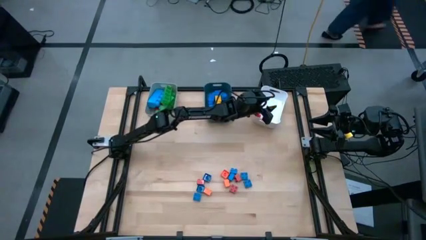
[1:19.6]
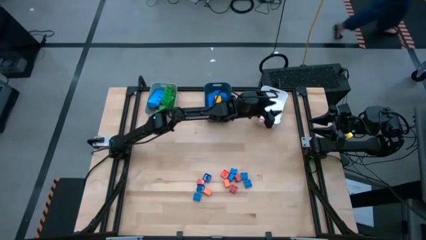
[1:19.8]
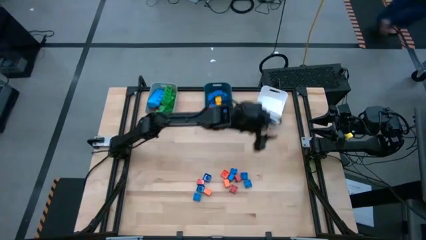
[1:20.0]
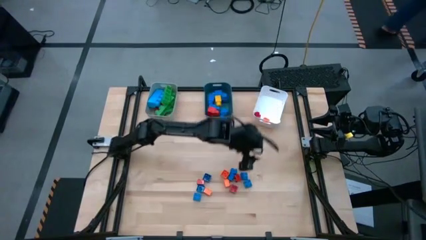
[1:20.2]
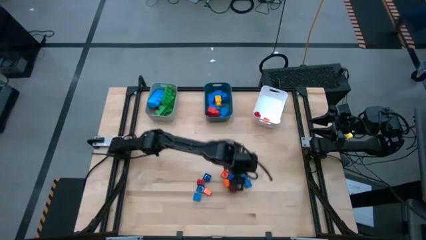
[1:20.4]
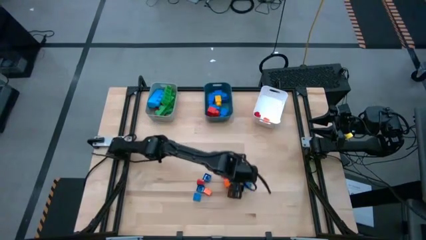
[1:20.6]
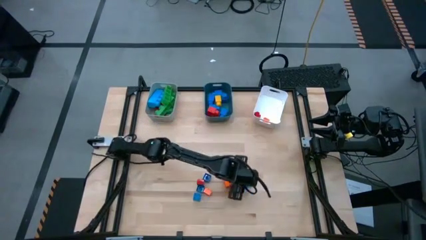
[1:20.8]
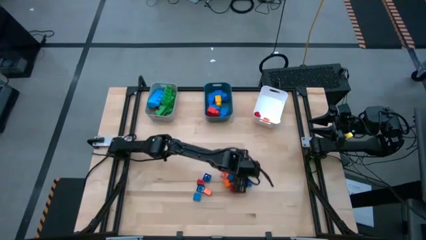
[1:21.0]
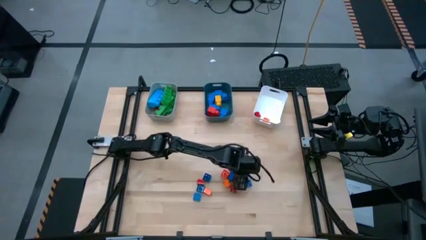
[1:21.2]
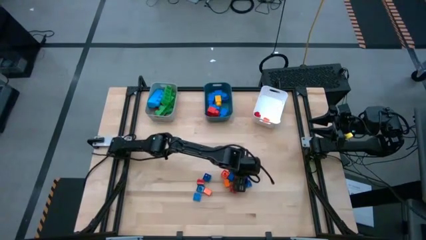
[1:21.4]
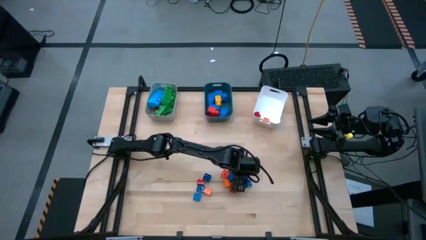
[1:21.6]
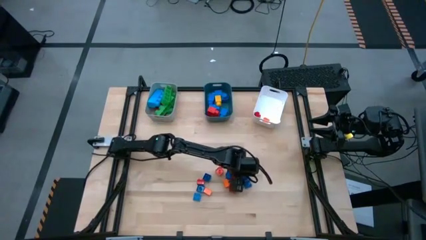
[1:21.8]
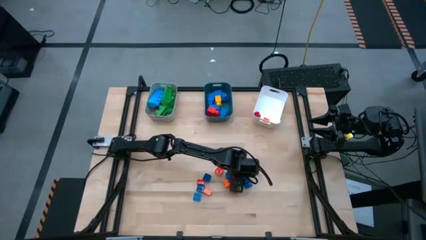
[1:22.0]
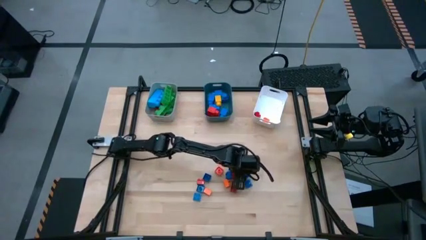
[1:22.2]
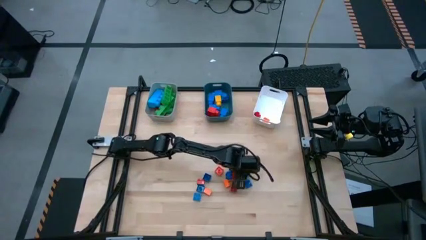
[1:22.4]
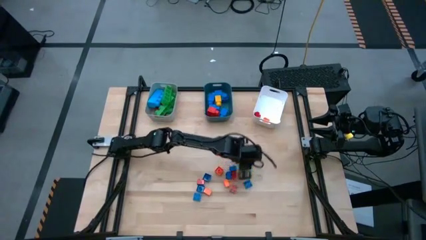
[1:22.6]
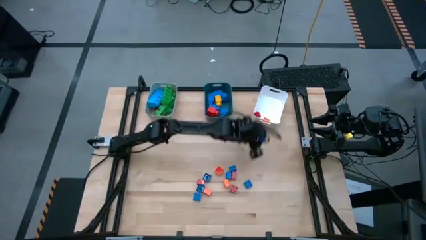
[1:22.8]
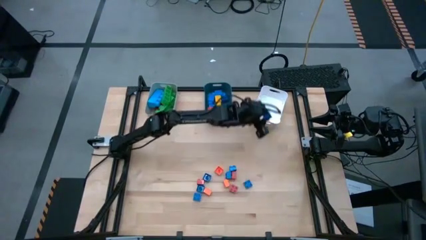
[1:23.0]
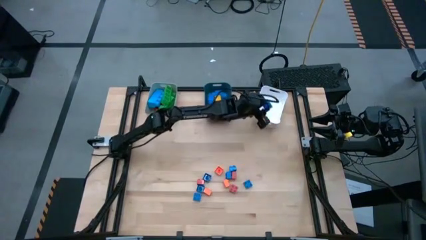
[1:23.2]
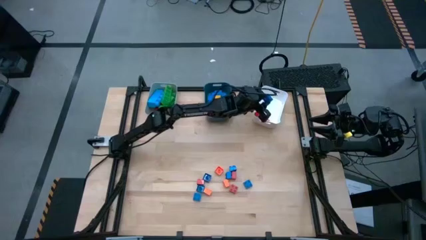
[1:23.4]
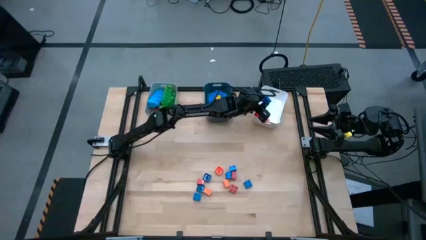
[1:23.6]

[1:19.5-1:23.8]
Task: Sort blocks by size
Put the small blue 4 stud game piece into the white bin

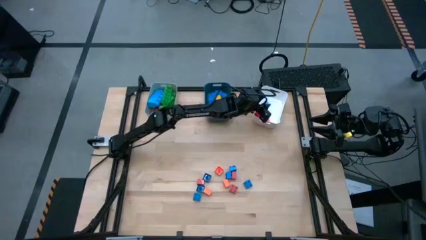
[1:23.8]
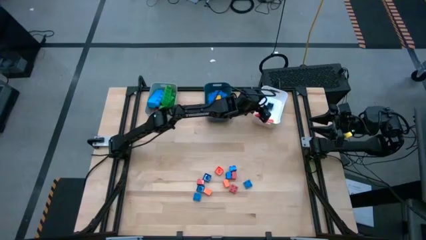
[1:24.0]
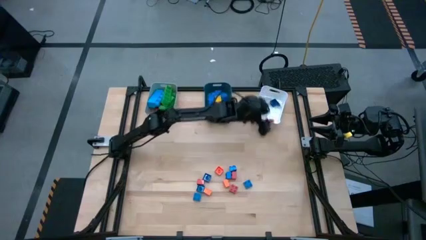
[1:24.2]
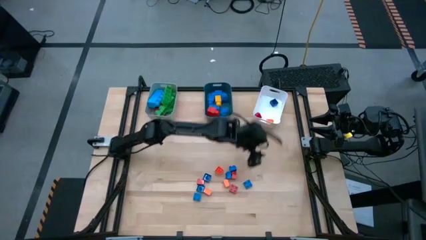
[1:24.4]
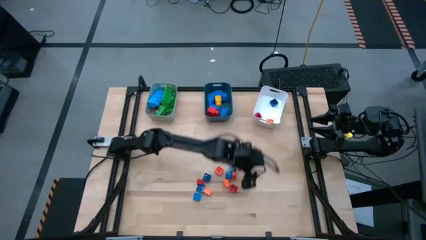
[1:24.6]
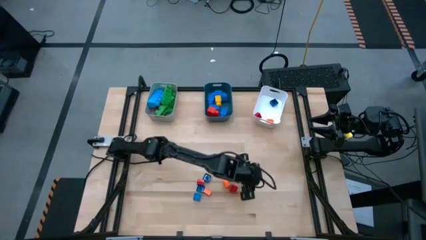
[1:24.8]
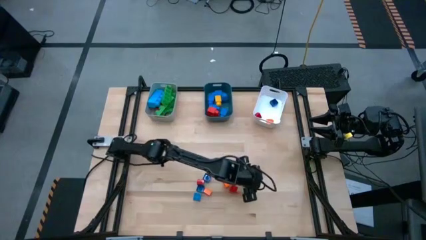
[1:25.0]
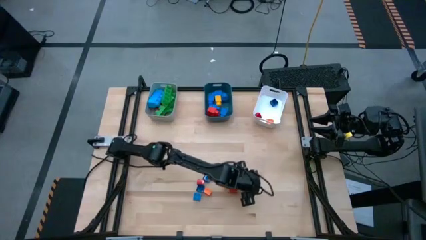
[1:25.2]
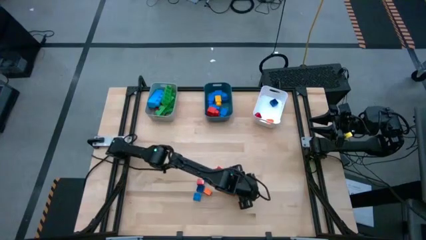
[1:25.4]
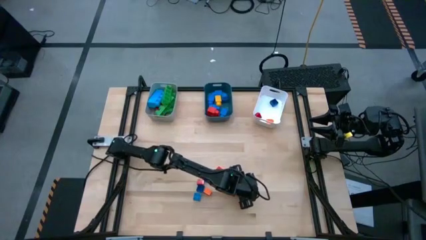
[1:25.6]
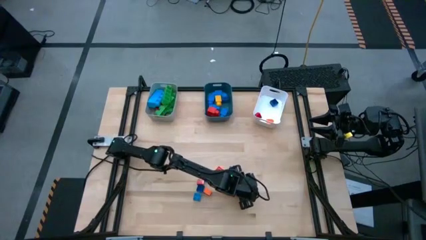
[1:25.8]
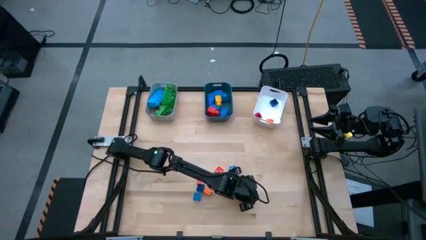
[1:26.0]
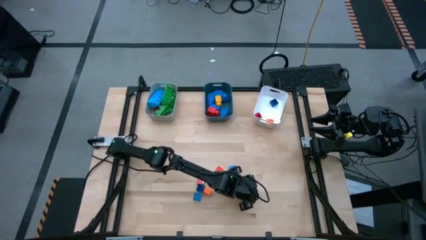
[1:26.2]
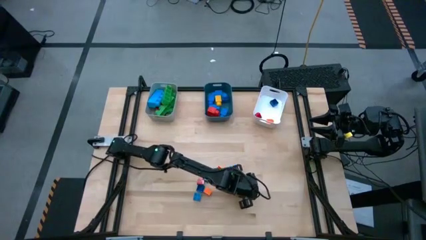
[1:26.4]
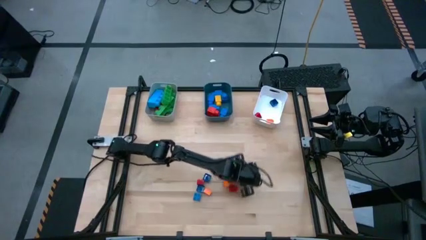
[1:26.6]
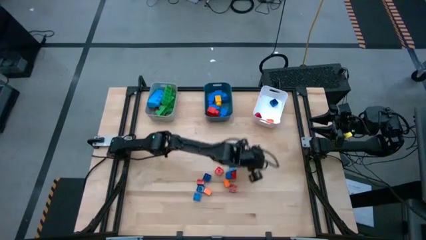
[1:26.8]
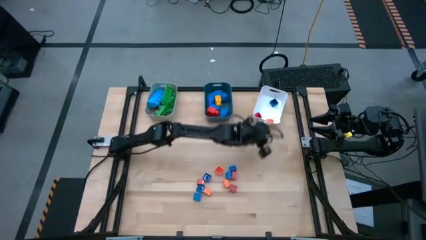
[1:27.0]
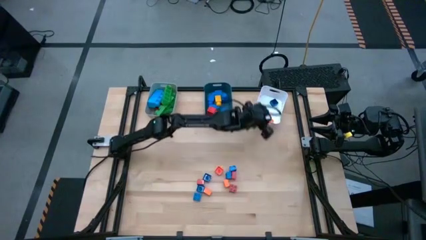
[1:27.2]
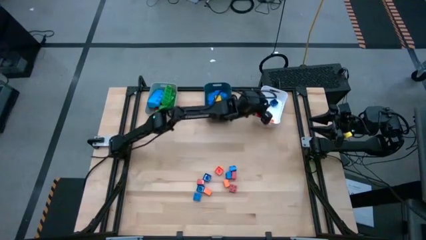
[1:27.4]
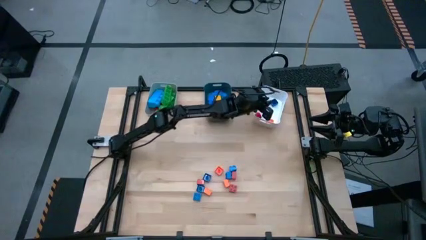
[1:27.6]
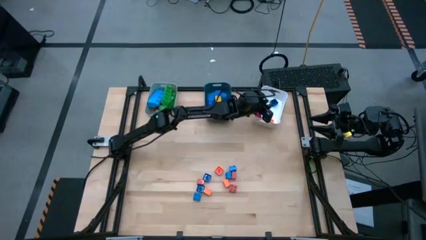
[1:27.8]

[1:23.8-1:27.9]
Put the small blue 4 stud game piece into the white bin

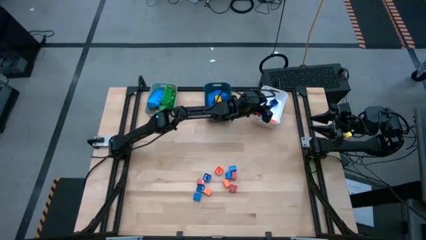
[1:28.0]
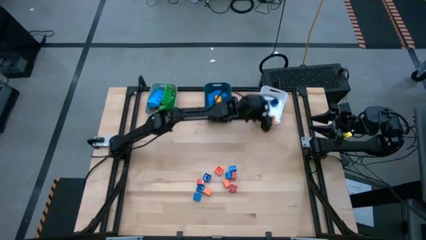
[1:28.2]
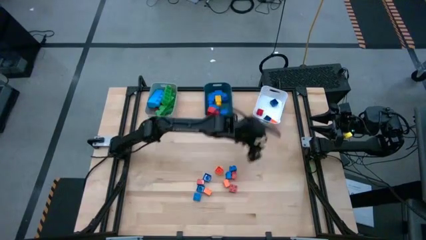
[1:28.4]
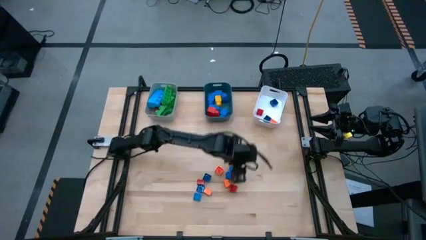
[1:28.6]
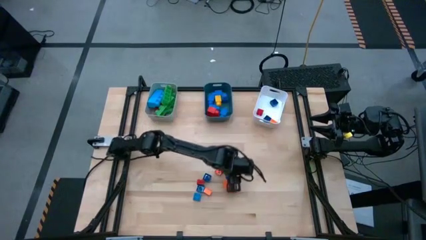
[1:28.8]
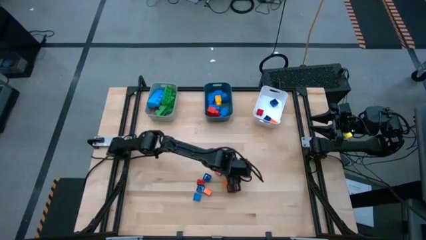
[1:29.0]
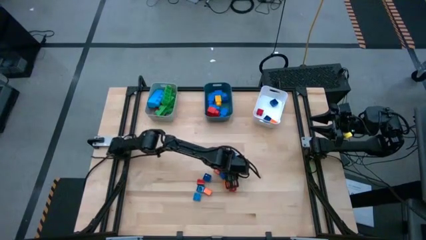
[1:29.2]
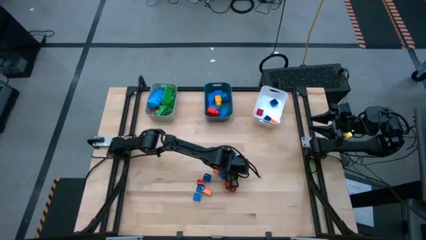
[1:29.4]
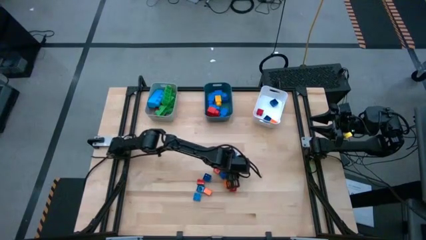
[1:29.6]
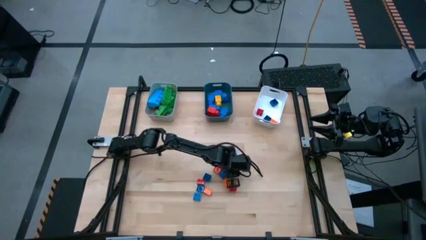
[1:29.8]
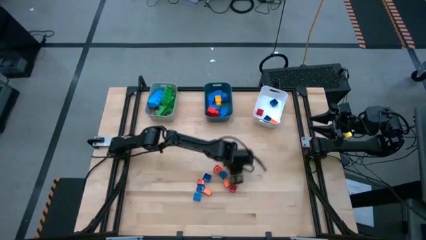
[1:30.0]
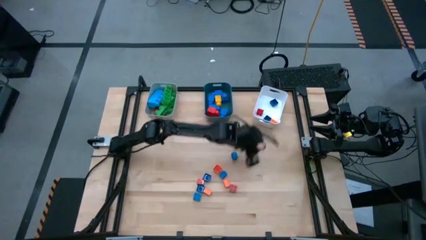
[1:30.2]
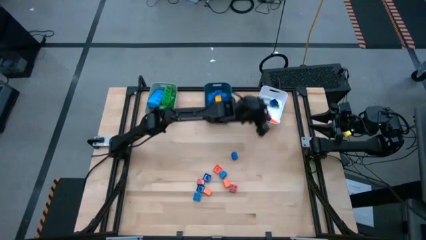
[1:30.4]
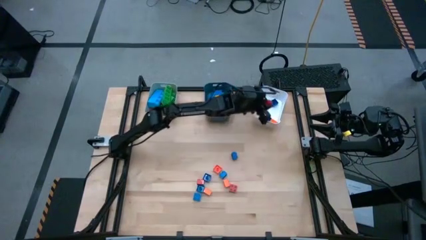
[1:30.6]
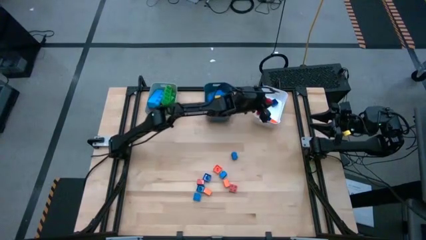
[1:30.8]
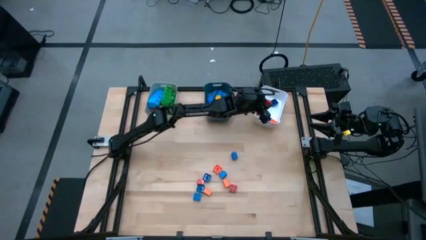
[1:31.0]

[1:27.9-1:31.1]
Put the small red 4 stud game piece into the white bin

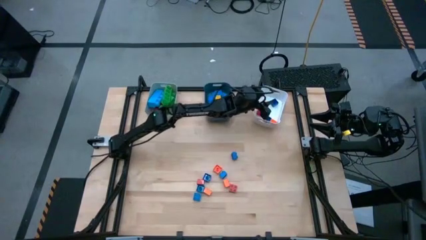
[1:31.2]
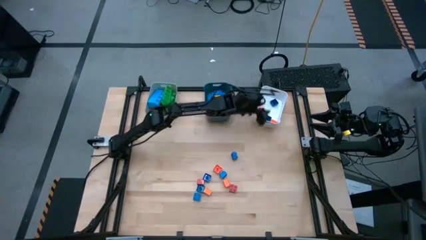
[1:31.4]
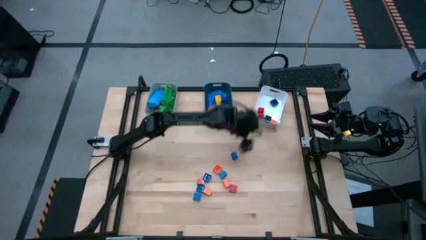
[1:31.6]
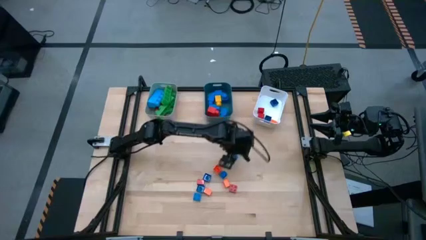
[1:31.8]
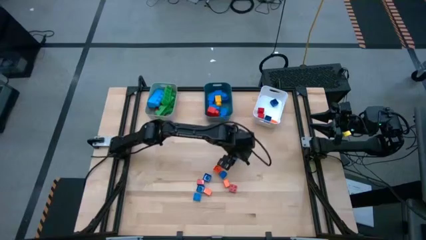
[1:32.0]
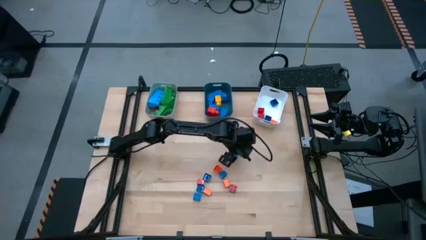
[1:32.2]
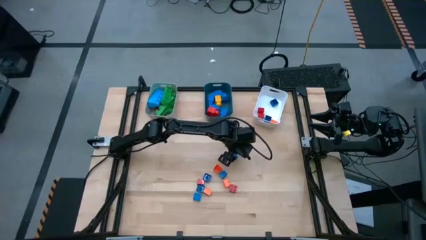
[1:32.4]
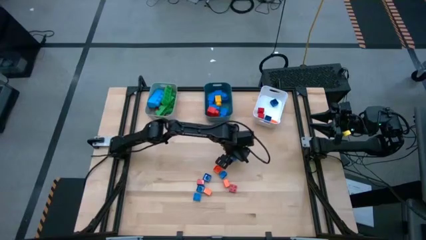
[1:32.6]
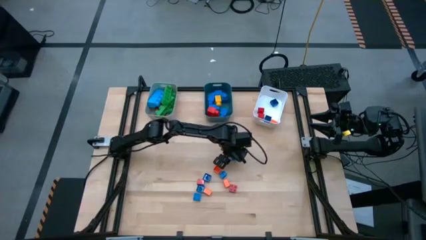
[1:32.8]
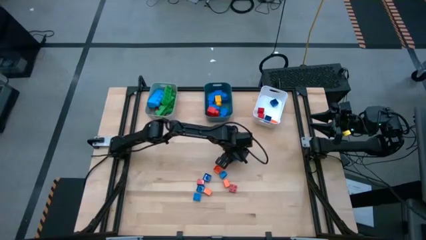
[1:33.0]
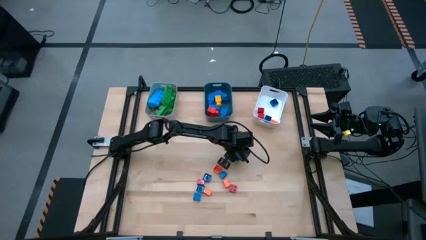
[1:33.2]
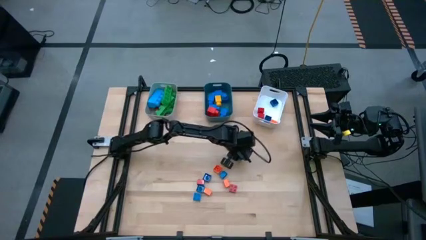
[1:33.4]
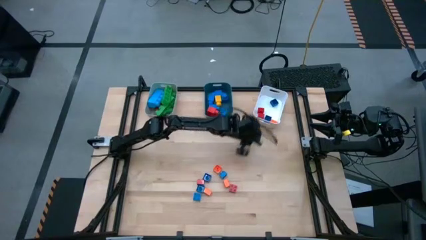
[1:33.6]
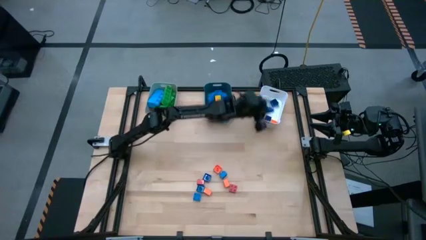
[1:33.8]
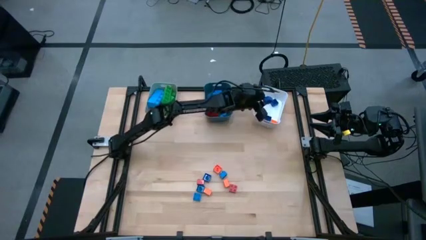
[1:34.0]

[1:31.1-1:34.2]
Put the small blue 4 stud game piece into the white bin

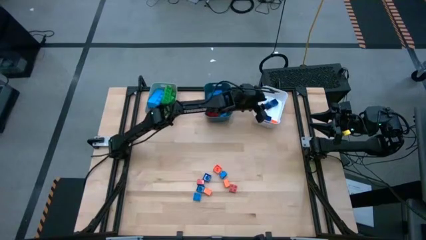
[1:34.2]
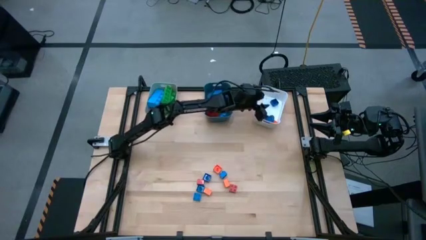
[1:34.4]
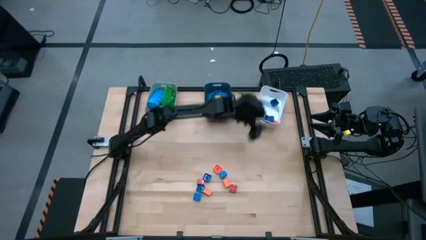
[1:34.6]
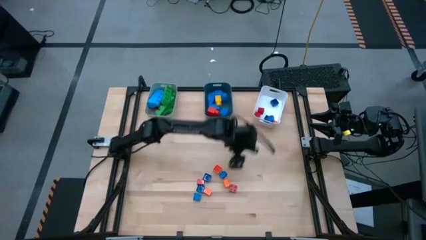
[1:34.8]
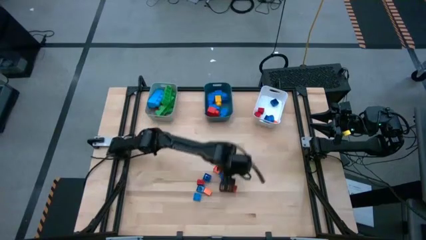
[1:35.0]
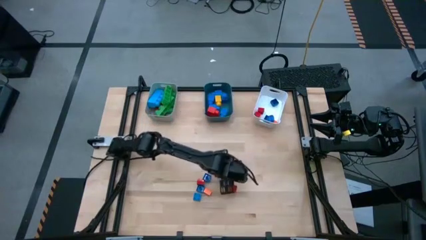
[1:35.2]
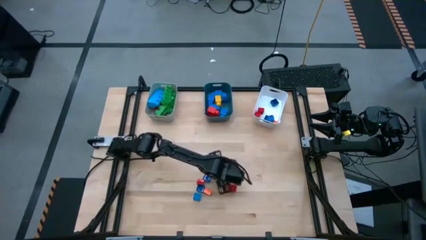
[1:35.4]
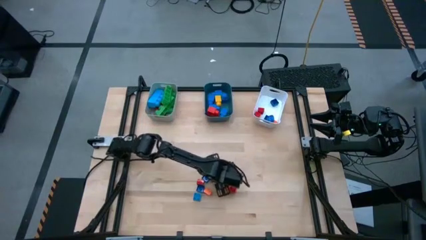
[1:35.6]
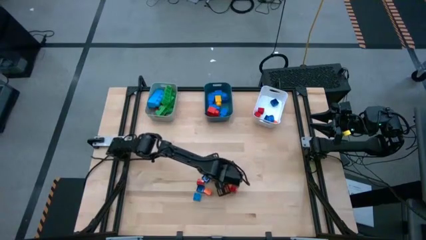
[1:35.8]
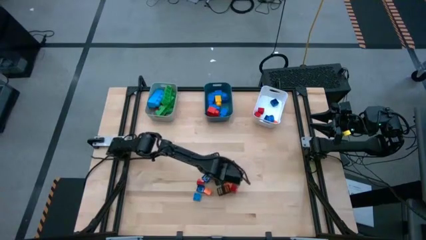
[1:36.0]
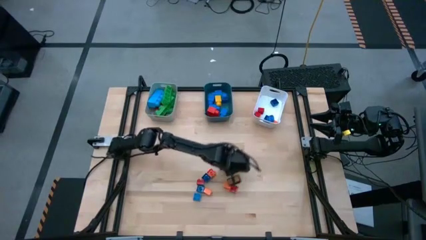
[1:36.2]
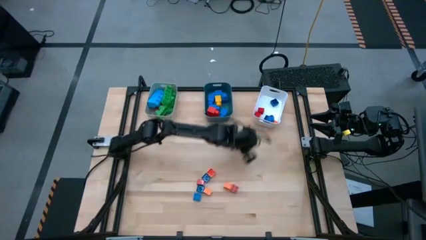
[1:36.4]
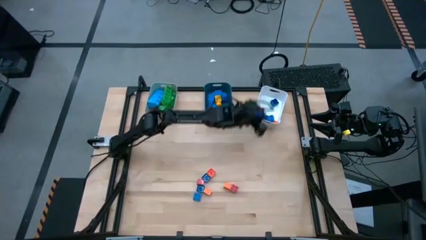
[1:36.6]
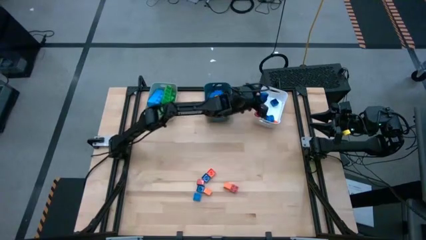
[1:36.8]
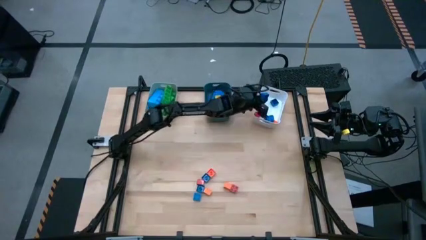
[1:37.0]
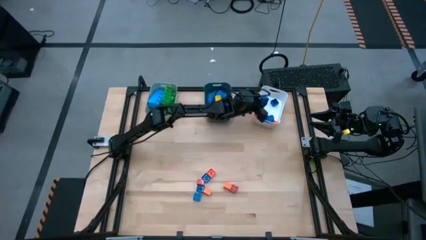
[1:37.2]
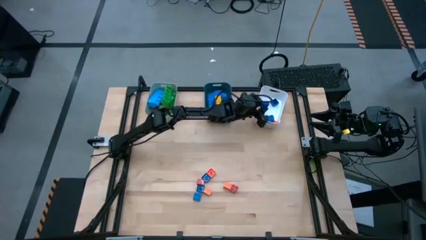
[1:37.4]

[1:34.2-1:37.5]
Put the small blue 4 stud game piece into the white bin
